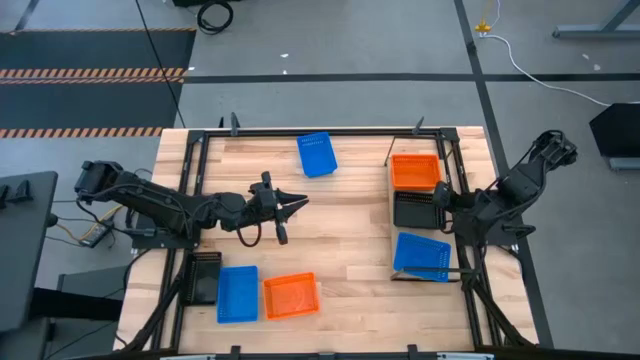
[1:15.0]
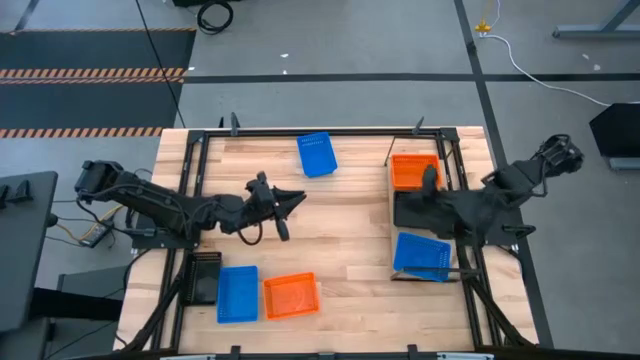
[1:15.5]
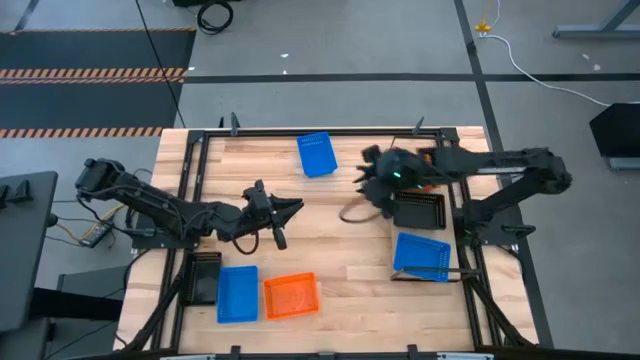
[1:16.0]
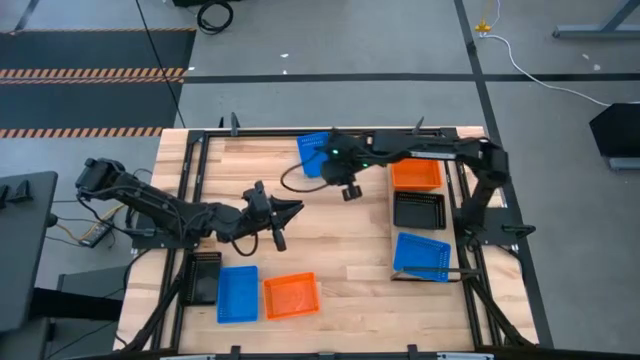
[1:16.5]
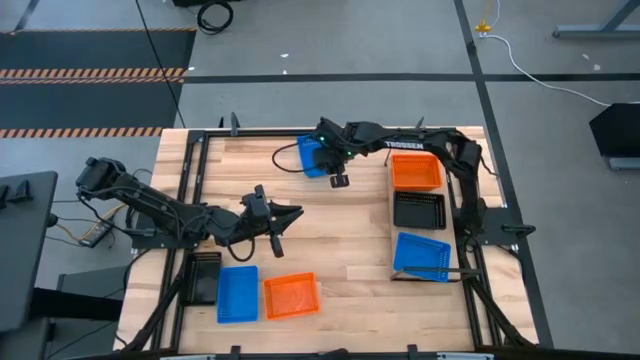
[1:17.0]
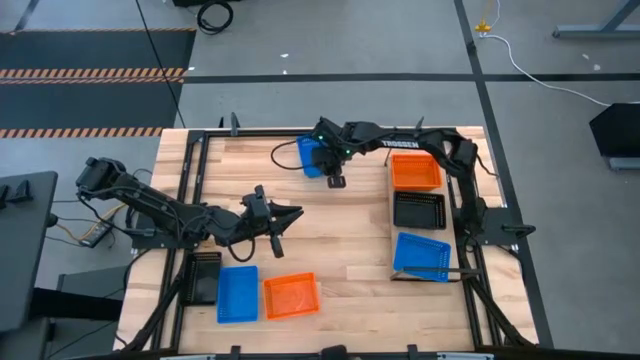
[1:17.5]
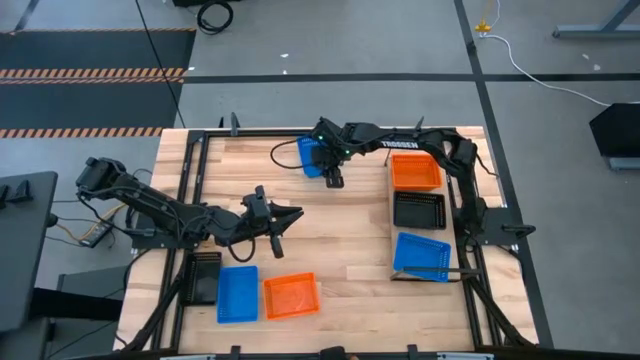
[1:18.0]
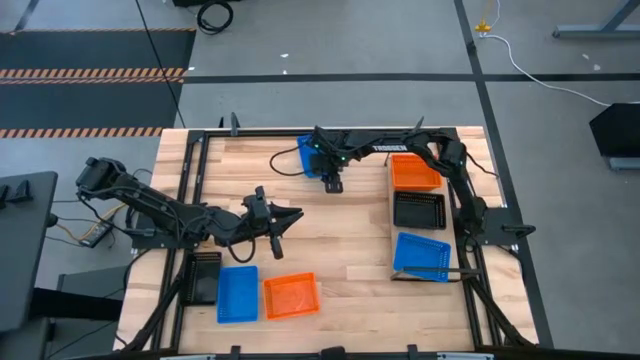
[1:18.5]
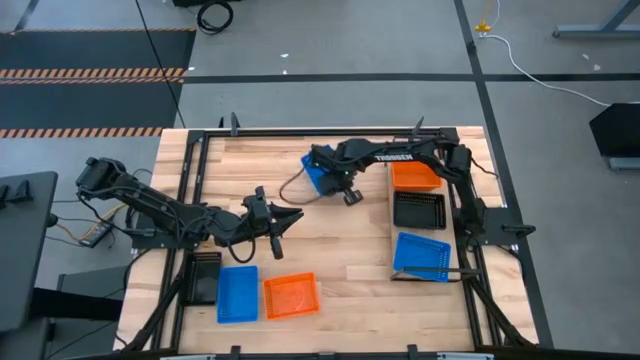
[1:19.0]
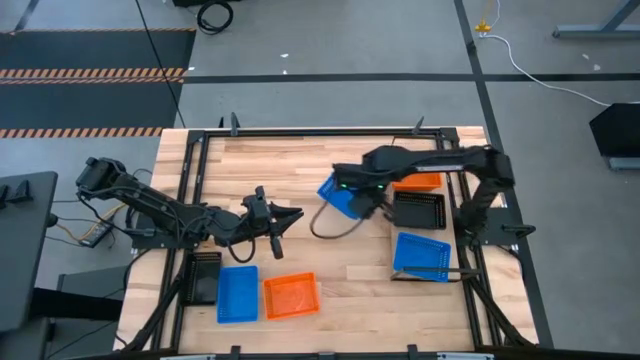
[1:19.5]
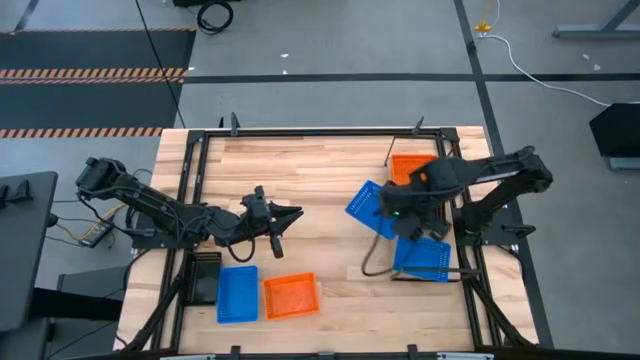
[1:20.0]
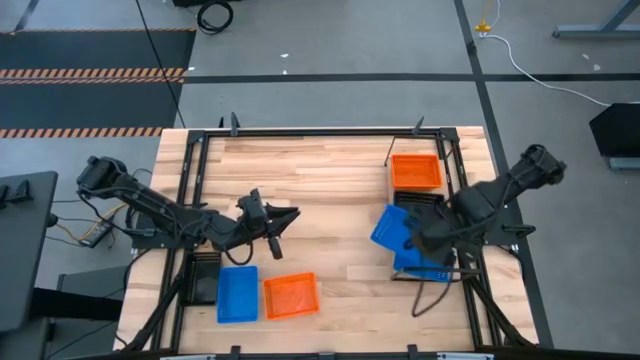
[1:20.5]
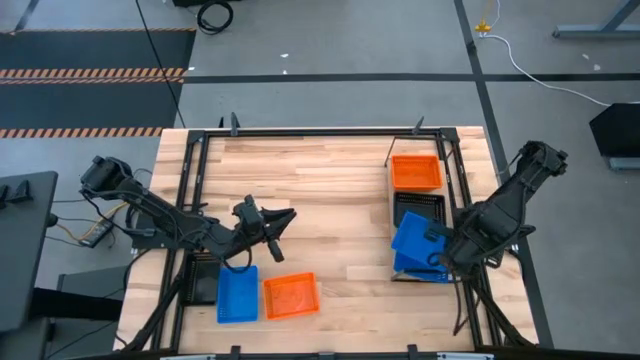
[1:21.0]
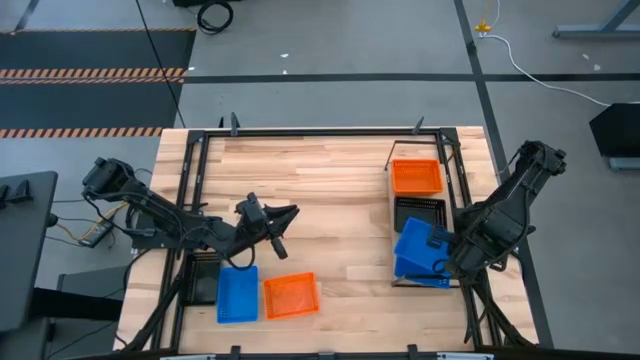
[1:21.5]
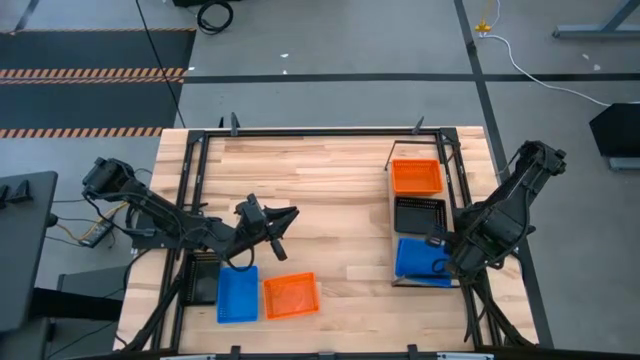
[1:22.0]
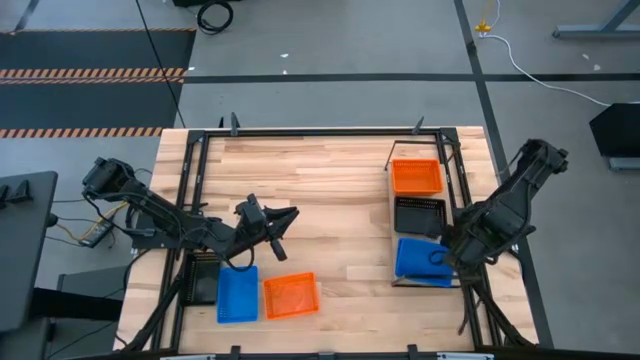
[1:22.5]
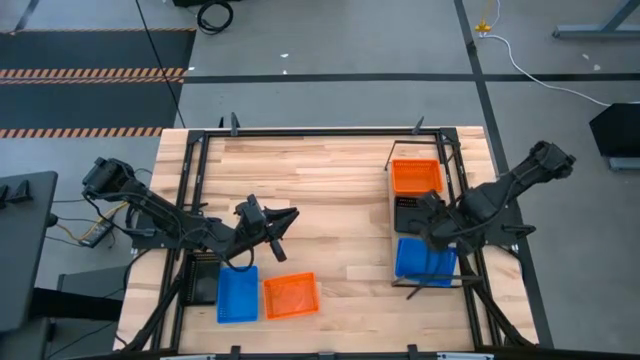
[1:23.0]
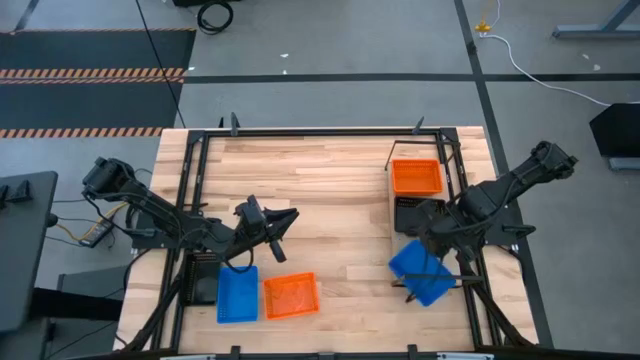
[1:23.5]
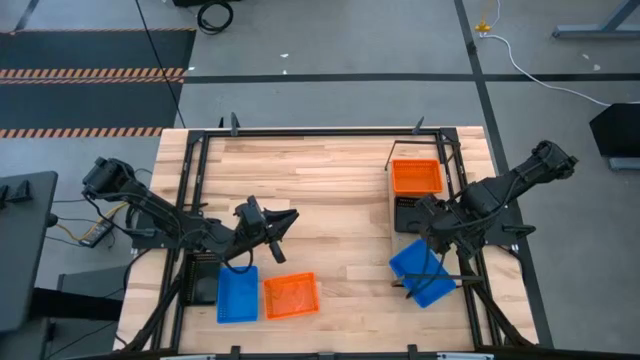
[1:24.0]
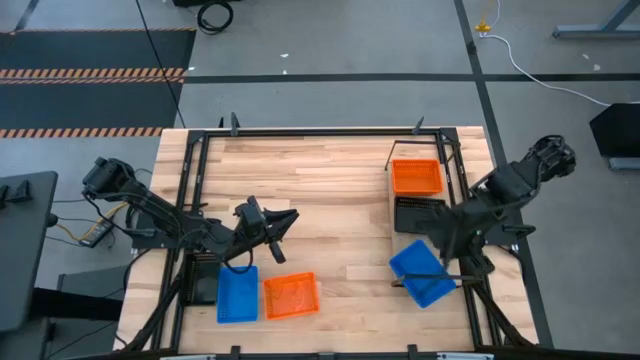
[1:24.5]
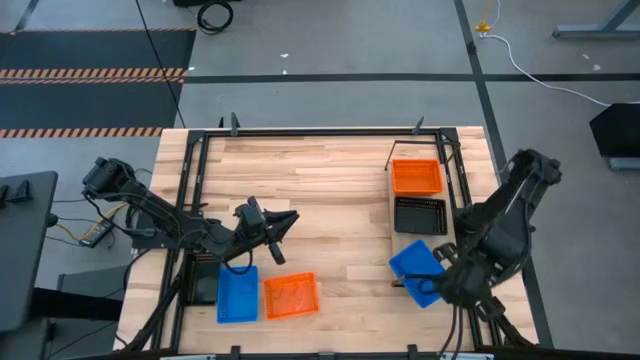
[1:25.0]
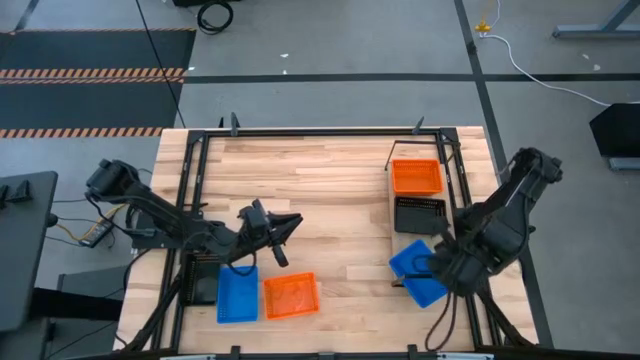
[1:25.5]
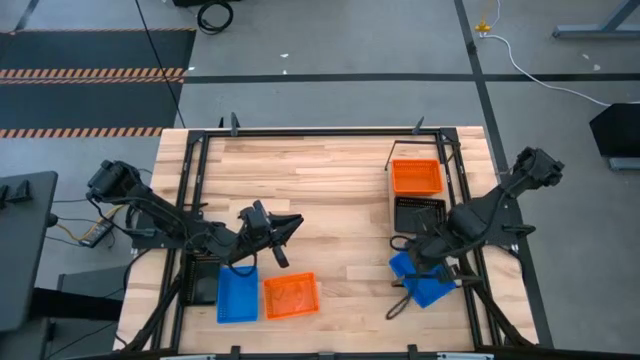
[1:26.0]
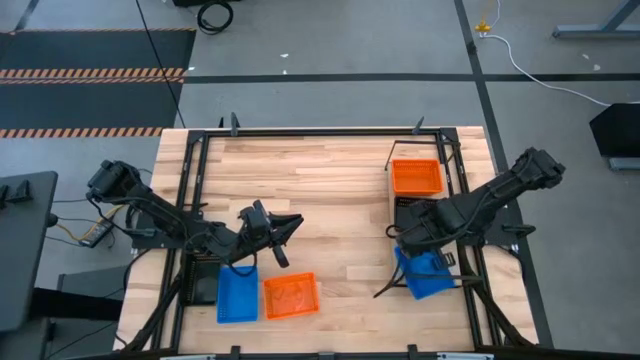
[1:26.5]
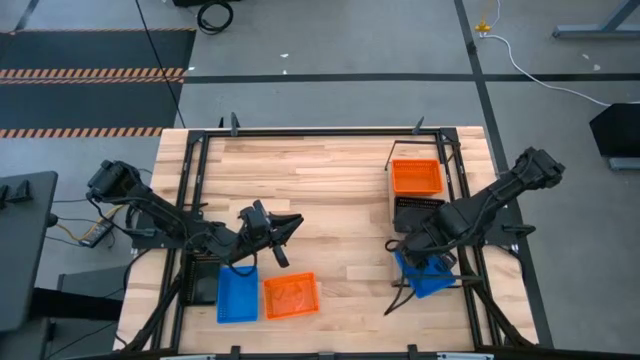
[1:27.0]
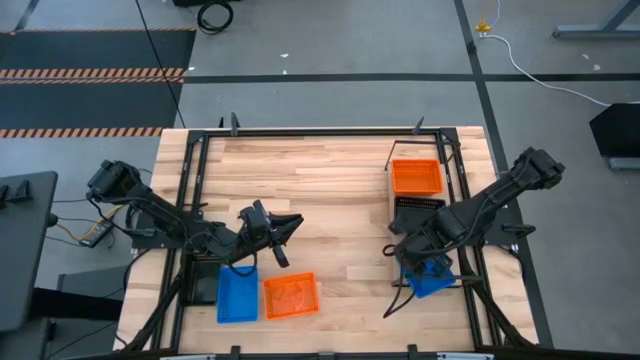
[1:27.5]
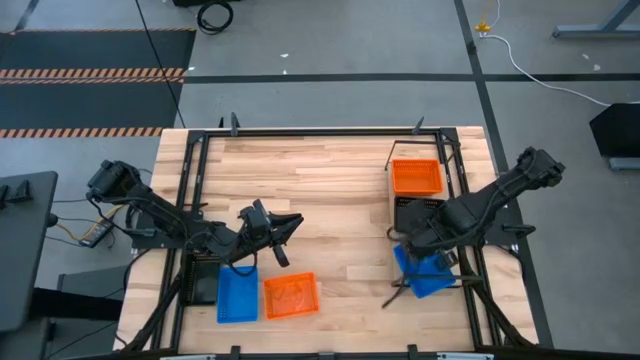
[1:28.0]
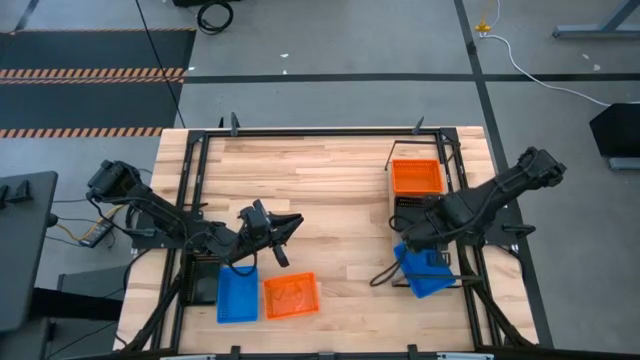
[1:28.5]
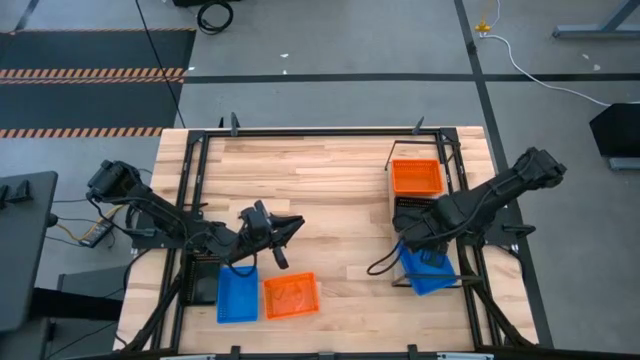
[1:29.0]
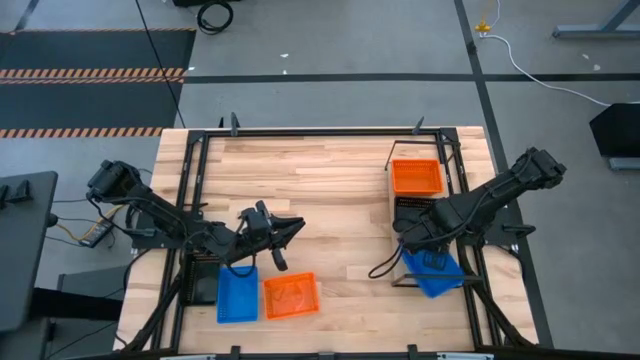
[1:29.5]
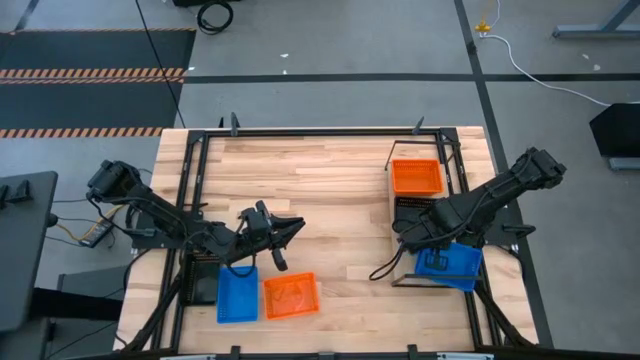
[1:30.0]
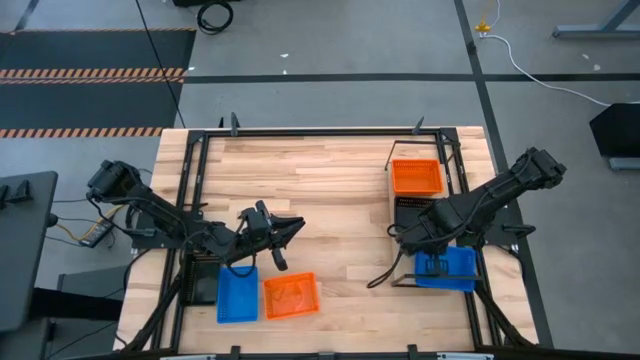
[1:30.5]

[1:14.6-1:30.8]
Task: Stack baskets on shelf by color
Stack the top blue bin on top of the blue bin on the shelf
